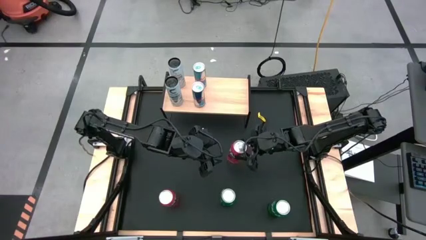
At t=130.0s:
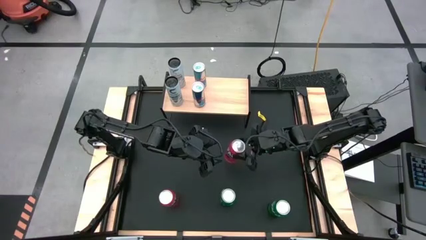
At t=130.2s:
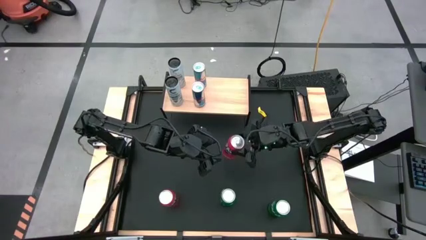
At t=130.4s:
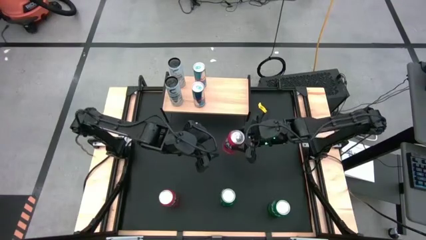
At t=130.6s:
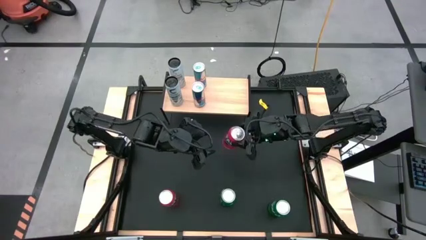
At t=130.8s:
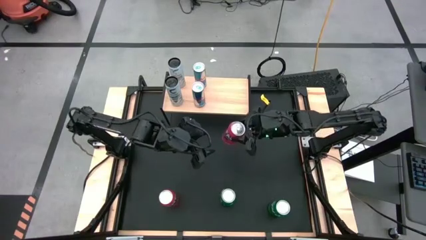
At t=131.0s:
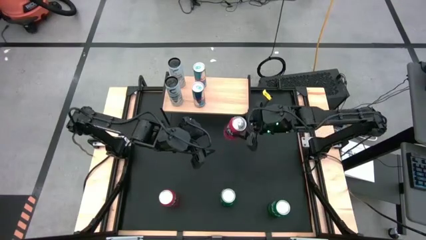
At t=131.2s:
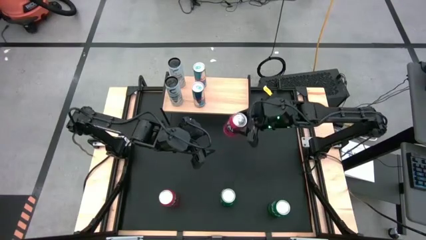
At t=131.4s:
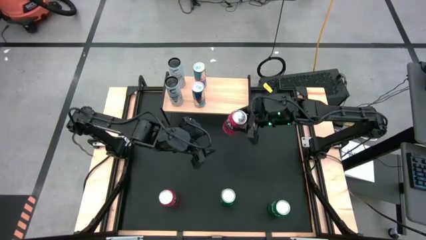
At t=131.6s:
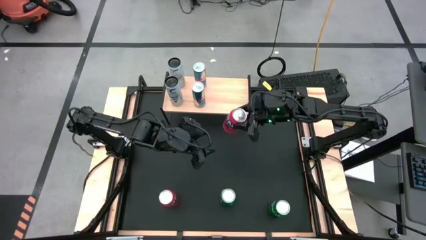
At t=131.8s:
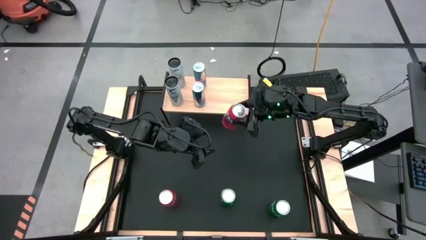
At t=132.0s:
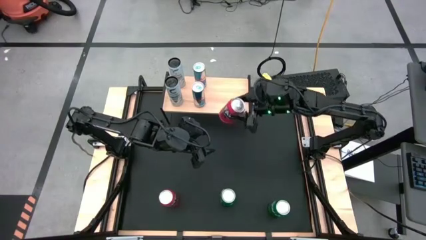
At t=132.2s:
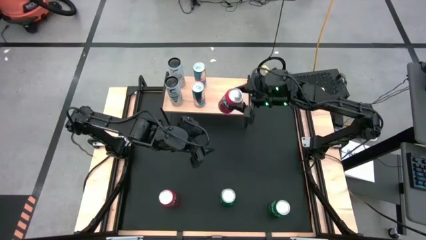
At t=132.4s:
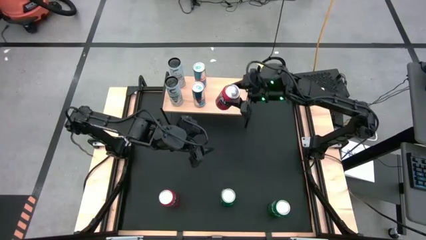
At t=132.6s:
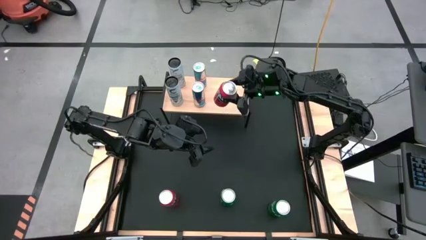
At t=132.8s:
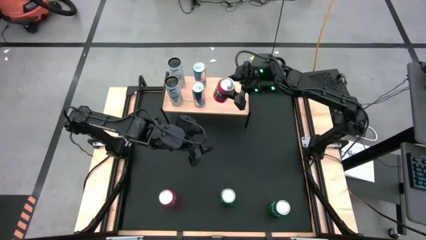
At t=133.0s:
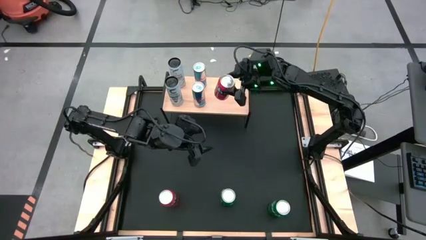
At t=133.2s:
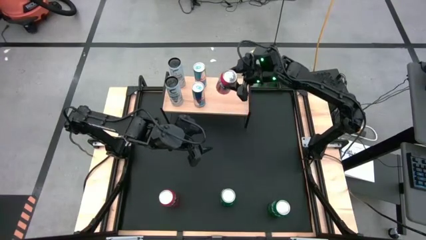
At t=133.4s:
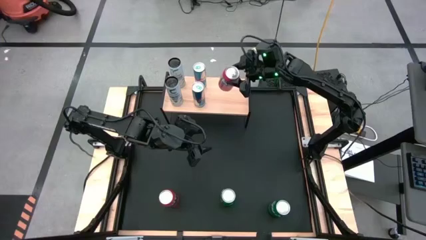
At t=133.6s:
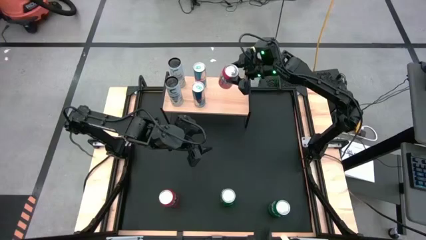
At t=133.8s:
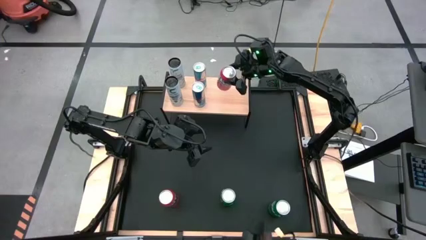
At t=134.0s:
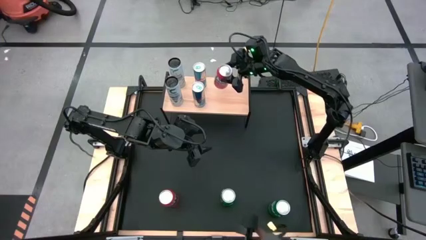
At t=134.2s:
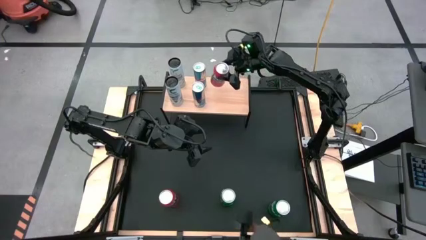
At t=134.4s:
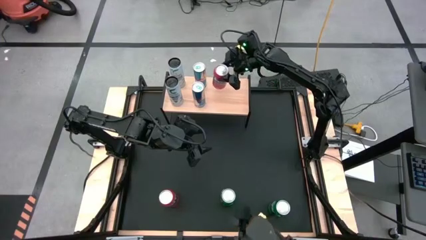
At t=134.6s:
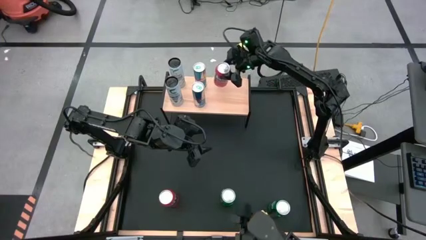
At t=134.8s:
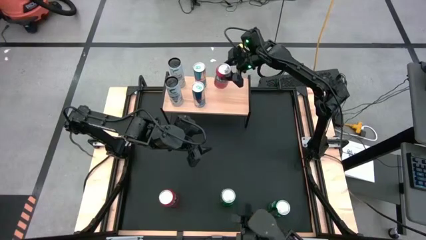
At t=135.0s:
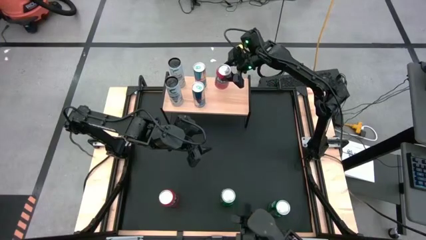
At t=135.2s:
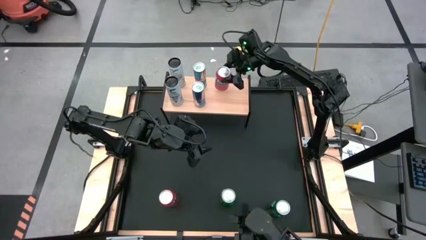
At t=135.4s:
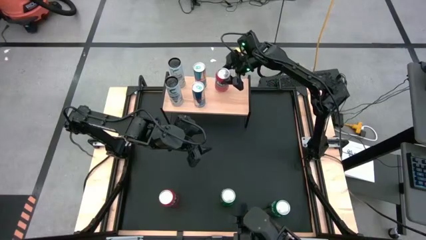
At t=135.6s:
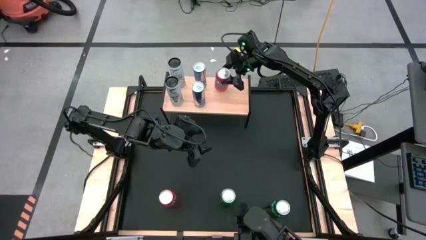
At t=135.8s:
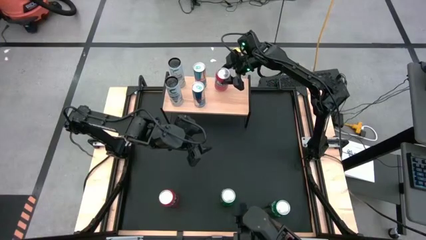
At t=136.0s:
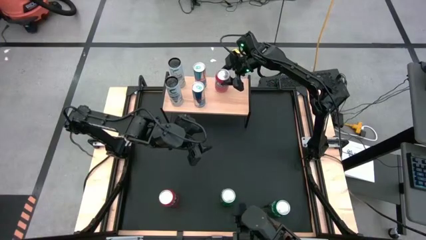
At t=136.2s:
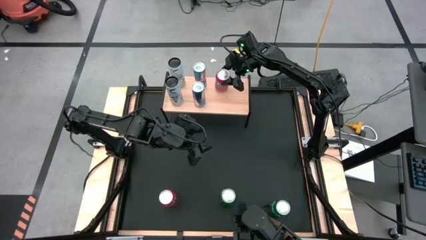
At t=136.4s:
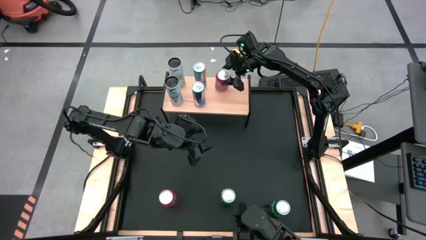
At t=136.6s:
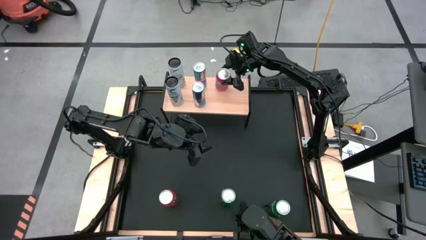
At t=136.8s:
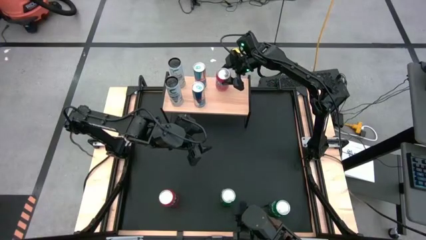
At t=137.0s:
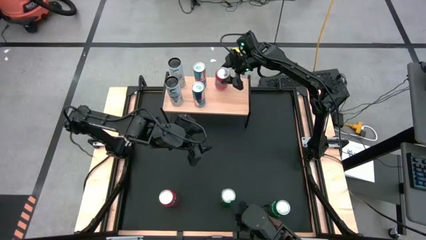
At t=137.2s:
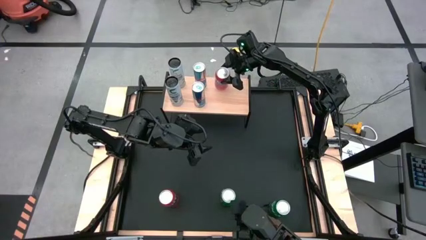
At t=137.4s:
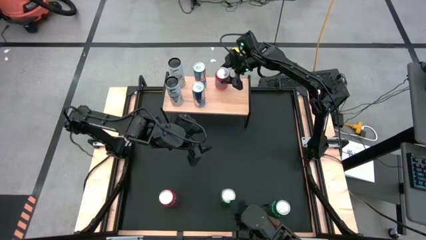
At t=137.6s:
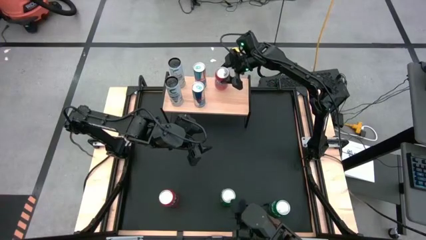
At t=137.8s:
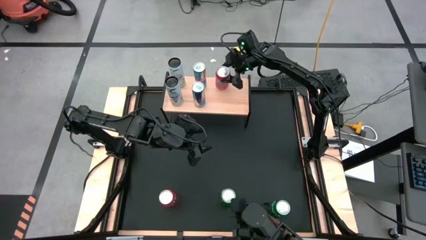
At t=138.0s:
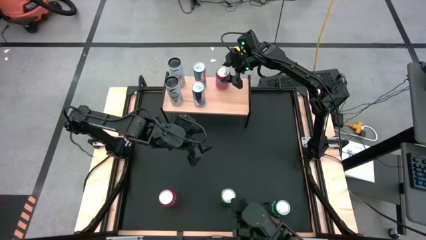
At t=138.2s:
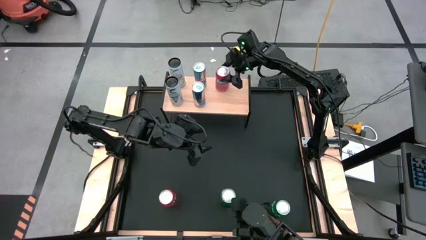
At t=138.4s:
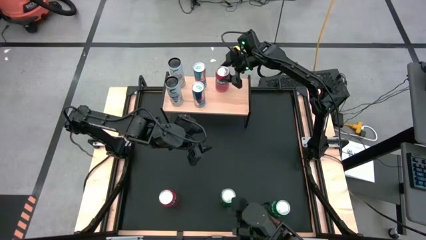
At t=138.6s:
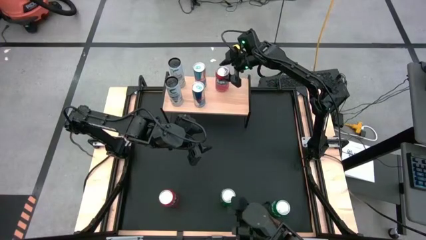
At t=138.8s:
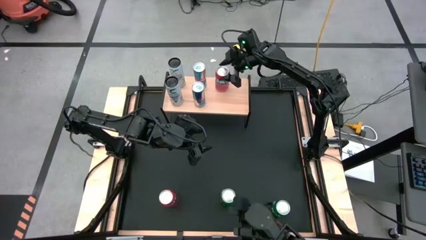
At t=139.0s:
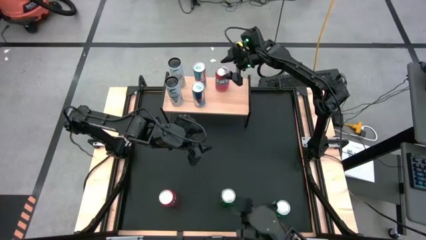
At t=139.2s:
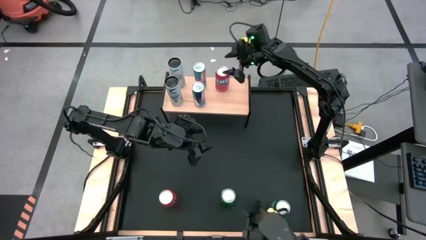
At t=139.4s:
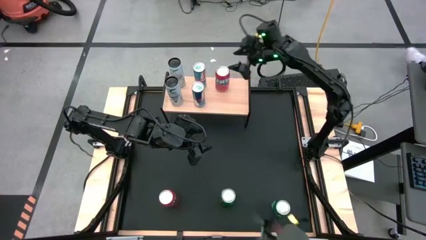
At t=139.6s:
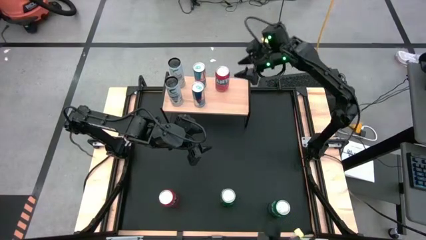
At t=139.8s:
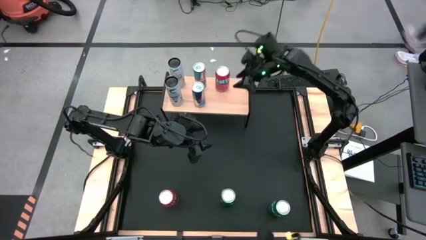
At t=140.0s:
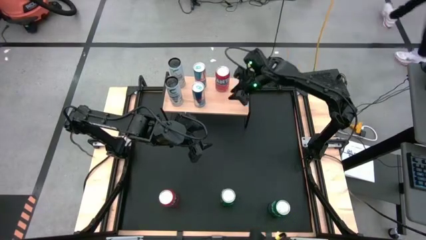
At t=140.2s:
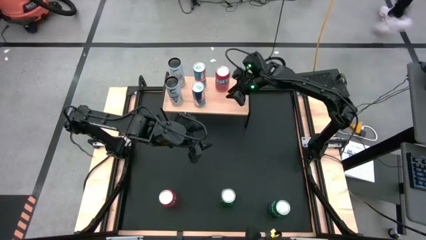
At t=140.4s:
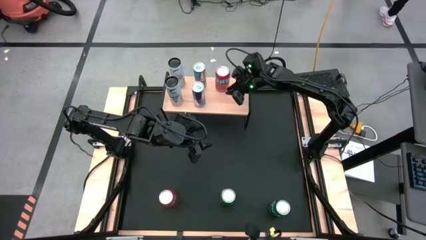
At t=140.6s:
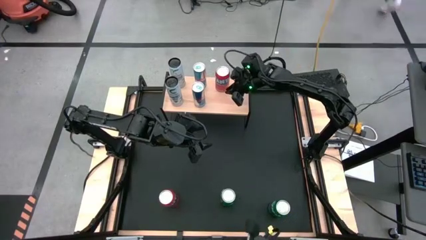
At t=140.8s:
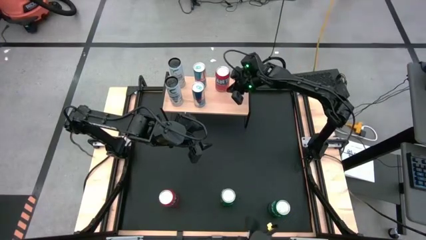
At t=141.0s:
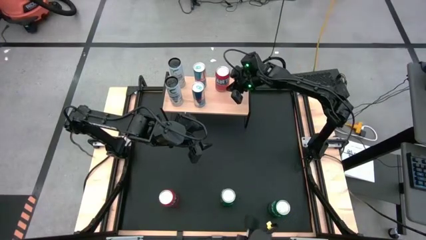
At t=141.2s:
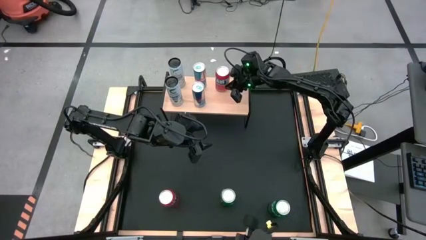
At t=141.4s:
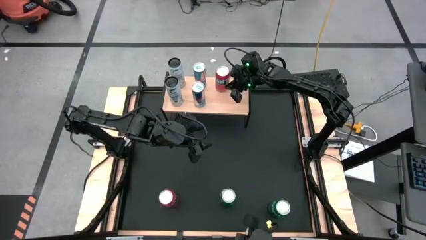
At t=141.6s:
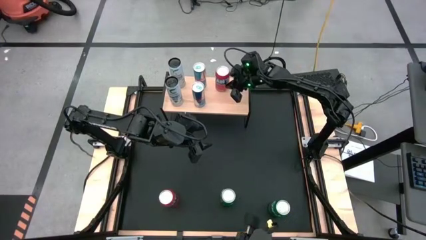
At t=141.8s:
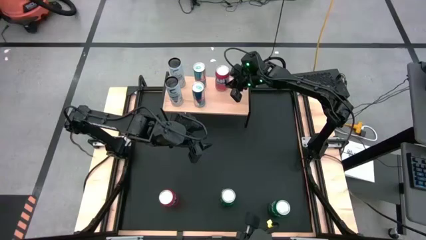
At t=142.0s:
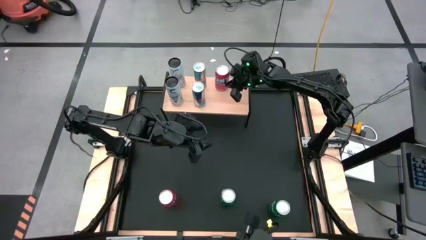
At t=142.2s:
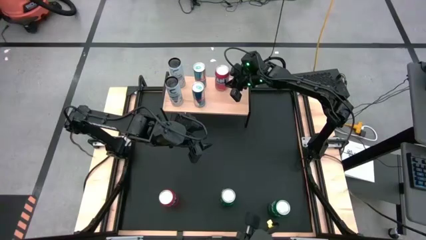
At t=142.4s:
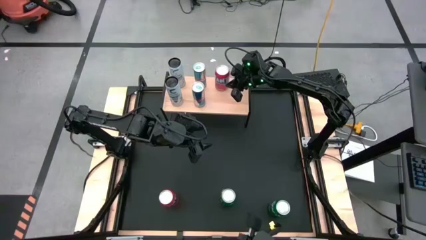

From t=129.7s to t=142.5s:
Task: Place canned beverage on shelf
Put the right orange soda can on the shelf

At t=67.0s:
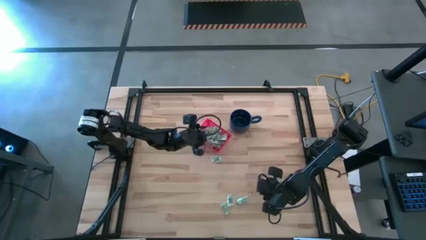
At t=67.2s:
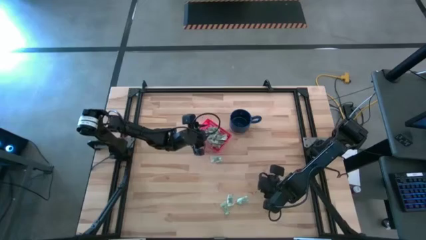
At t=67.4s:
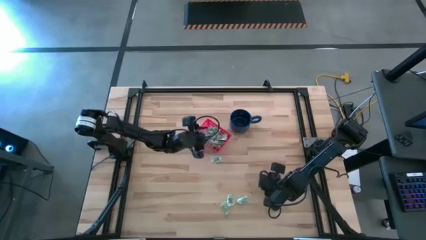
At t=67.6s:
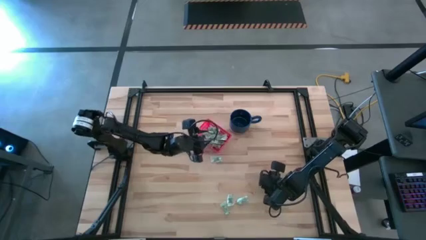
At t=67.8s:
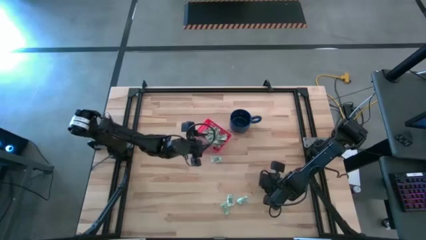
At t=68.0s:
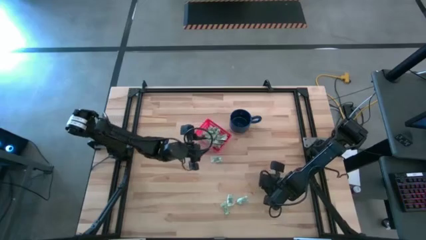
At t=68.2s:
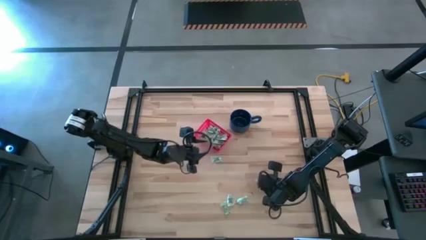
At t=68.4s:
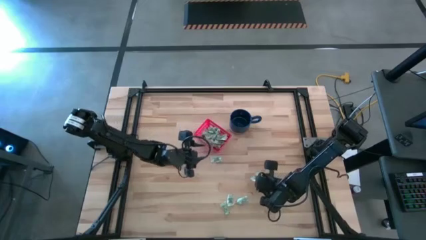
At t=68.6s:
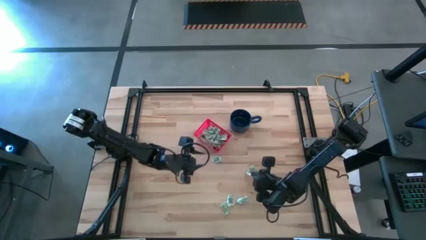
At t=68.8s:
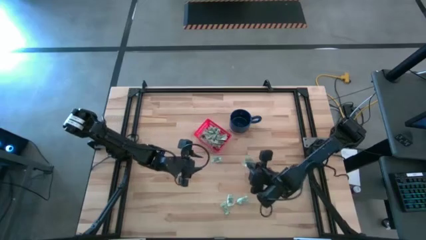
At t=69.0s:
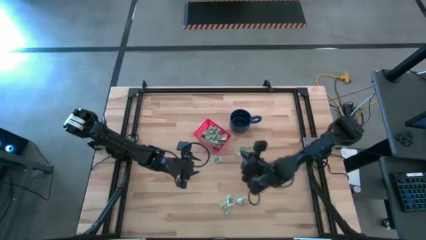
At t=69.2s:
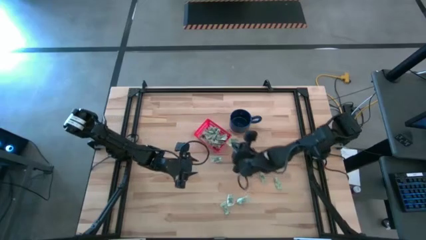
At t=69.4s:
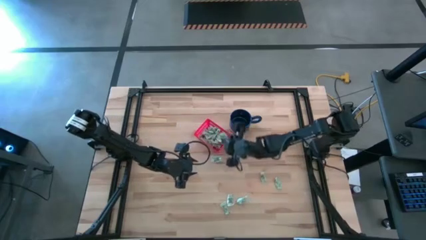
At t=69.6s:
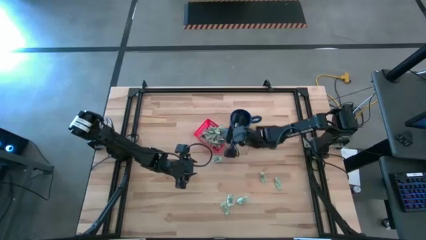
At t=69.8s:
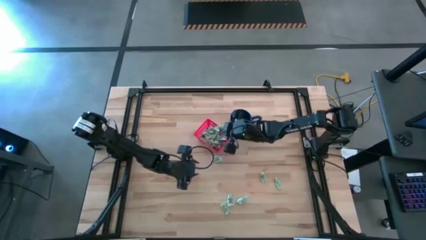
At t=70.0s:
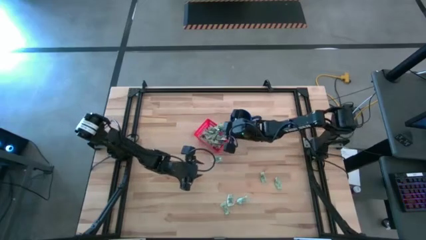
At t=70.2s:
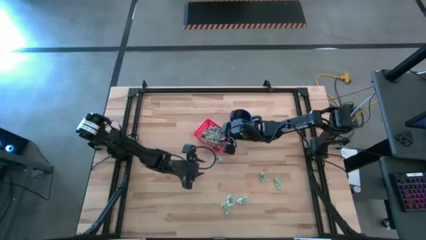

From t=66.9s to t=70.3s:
Task: Pick and place items into bin
Put the stevia packet into the bin

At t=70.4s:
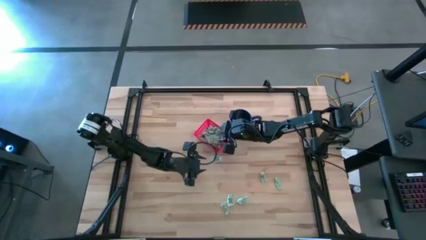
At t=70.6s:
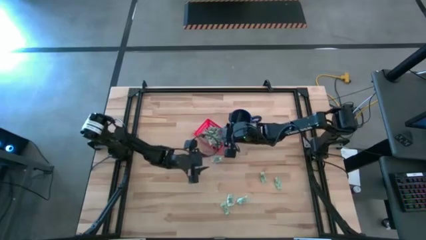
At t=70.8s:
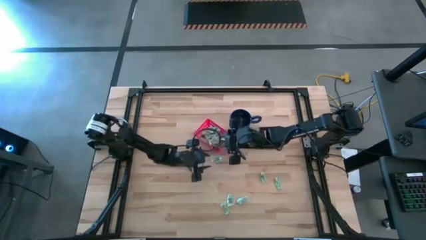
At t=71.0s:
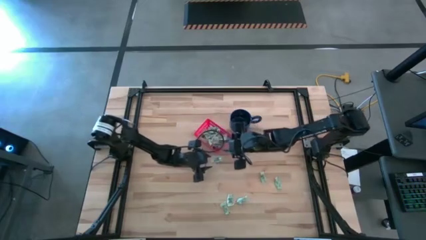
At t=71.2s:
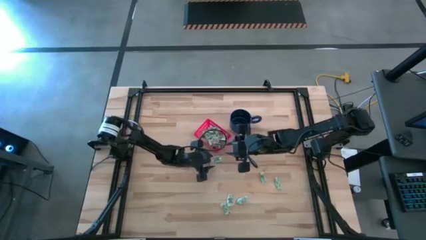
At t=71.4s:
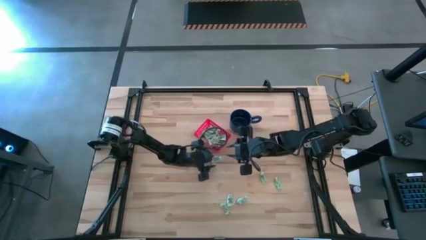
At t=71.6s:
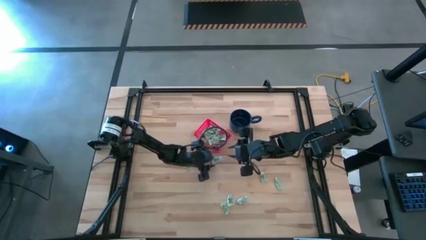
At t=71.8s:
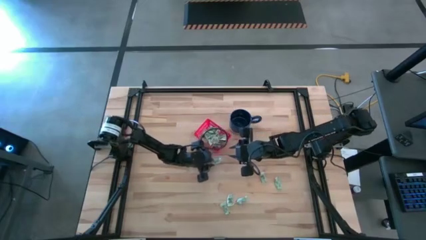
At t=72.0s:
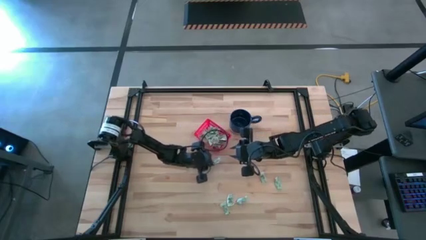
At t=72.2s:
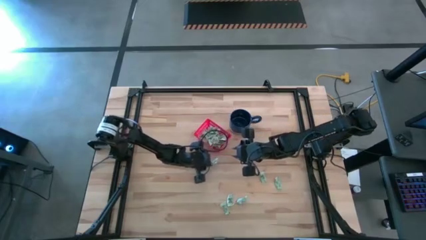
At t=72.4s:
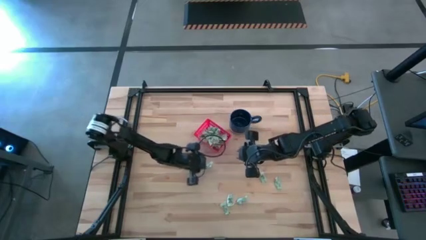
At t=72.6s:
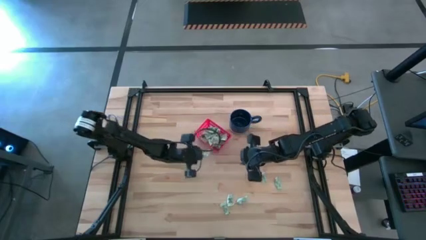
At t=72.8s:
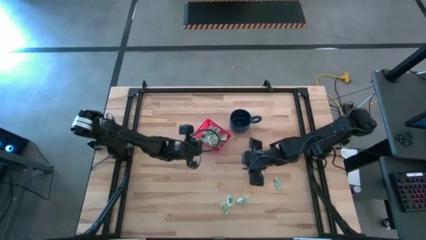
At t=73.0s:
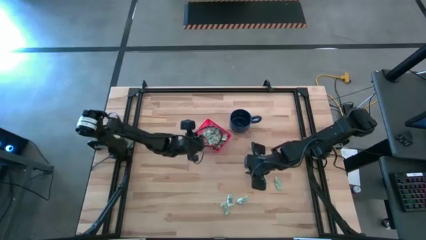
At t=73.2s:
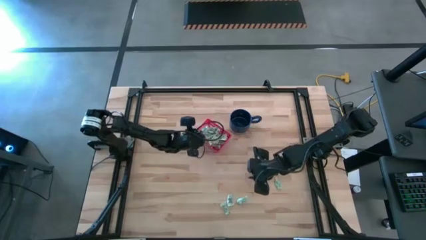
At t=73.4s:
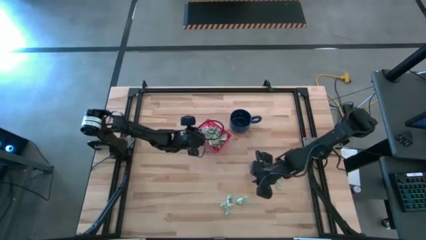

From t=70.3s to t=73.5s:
Put the stevia packet into the bin
